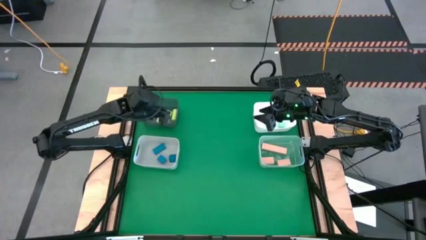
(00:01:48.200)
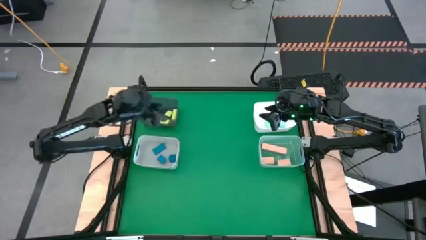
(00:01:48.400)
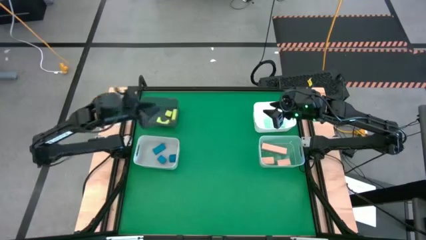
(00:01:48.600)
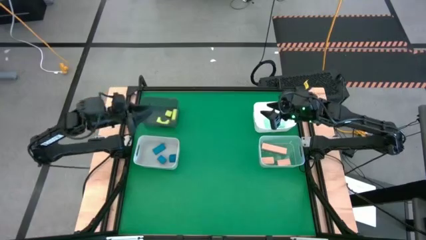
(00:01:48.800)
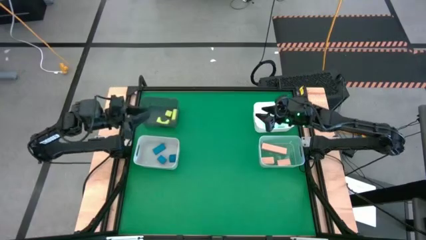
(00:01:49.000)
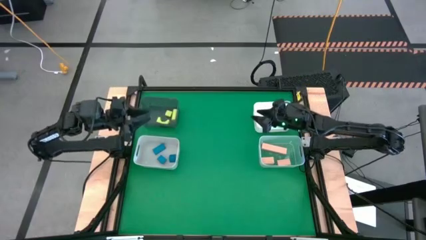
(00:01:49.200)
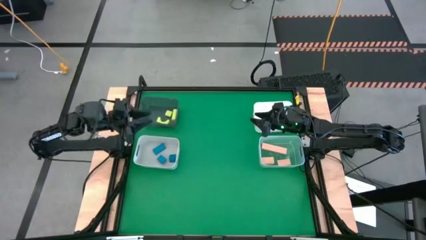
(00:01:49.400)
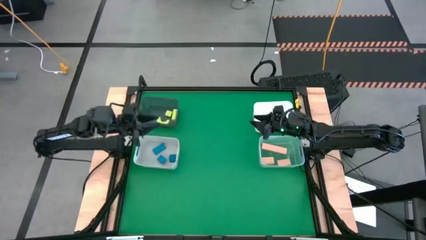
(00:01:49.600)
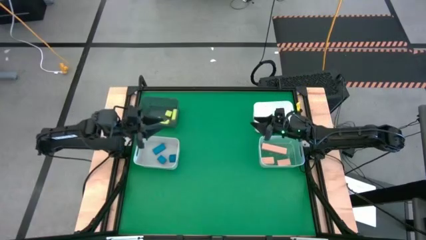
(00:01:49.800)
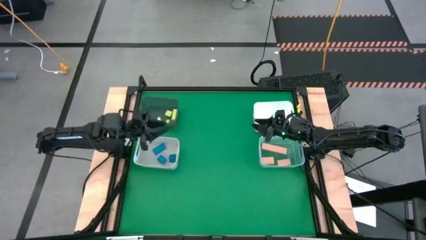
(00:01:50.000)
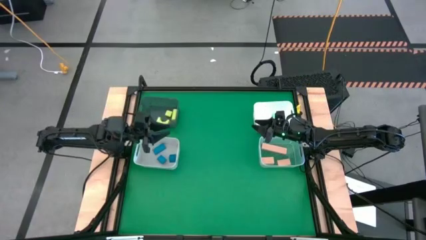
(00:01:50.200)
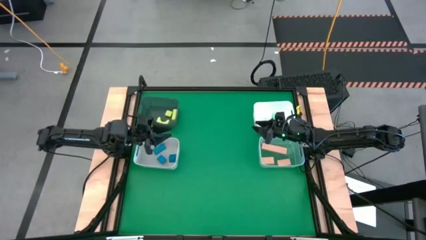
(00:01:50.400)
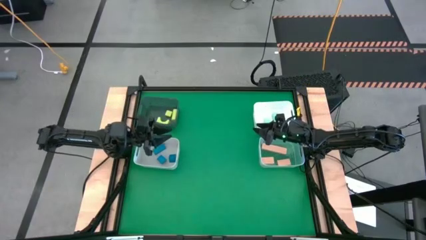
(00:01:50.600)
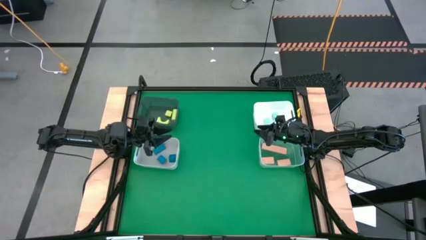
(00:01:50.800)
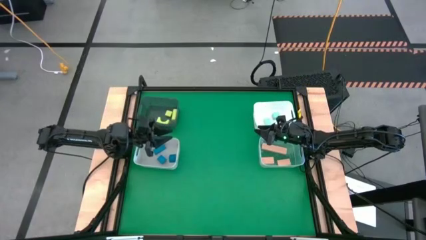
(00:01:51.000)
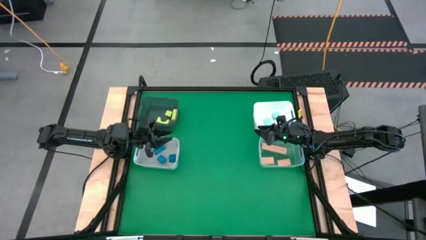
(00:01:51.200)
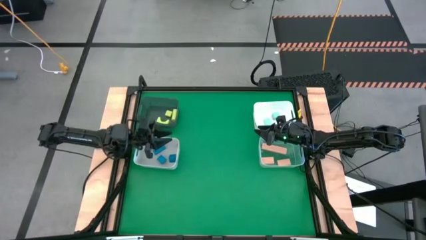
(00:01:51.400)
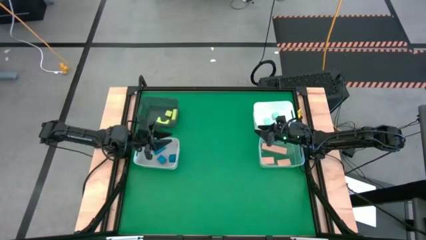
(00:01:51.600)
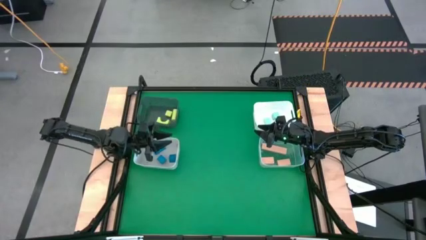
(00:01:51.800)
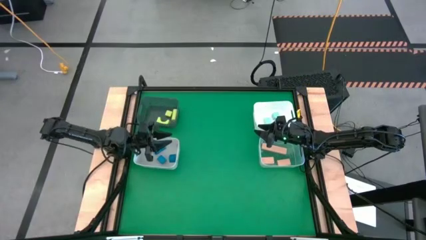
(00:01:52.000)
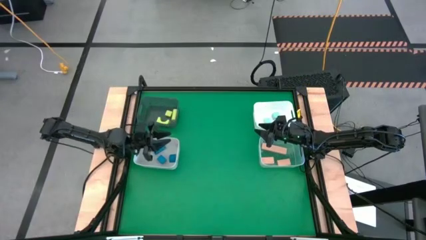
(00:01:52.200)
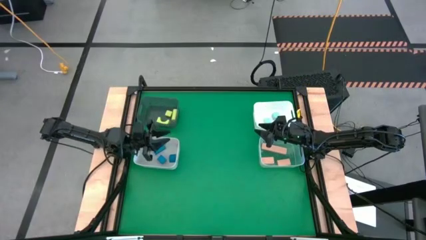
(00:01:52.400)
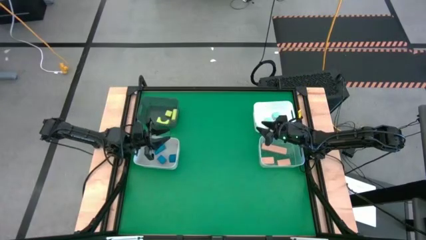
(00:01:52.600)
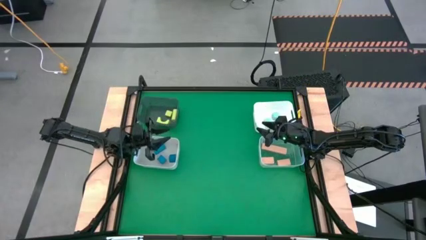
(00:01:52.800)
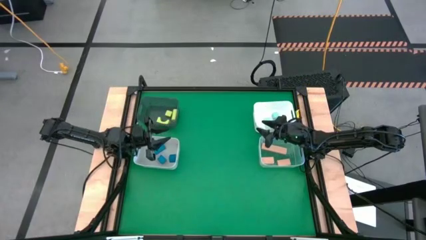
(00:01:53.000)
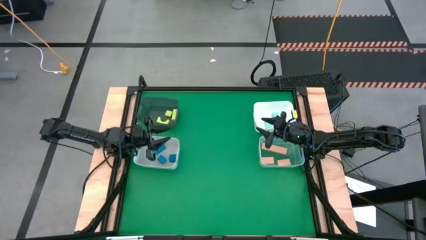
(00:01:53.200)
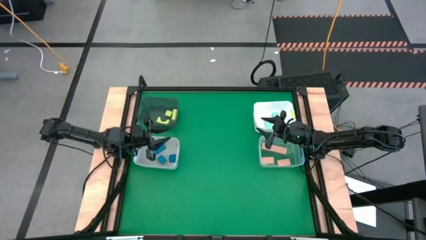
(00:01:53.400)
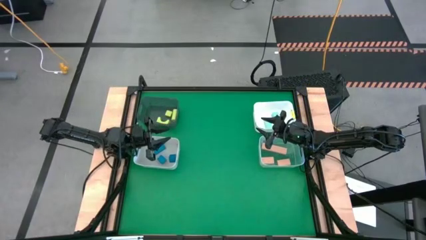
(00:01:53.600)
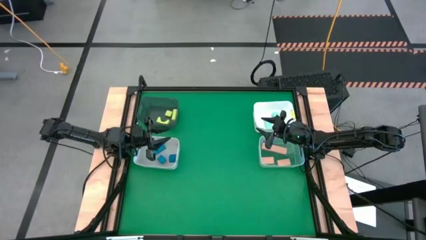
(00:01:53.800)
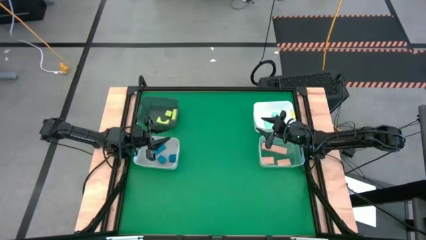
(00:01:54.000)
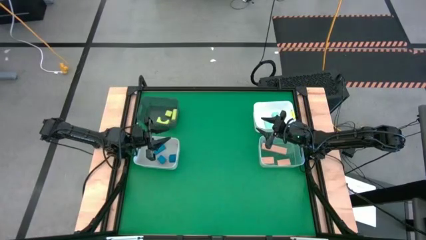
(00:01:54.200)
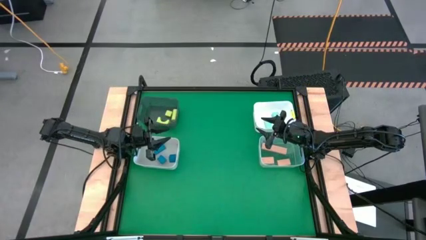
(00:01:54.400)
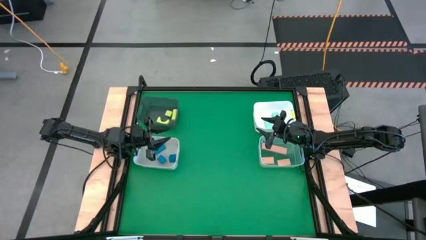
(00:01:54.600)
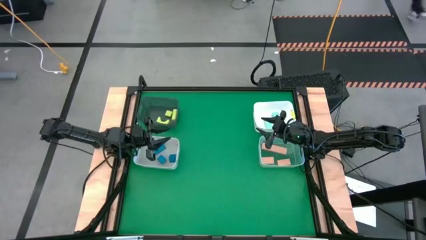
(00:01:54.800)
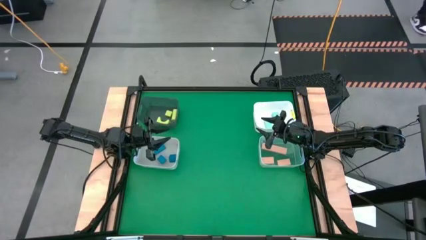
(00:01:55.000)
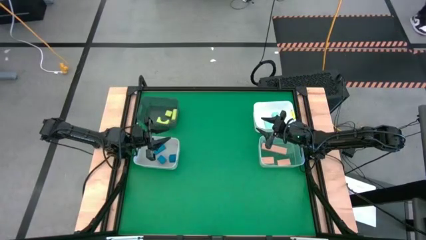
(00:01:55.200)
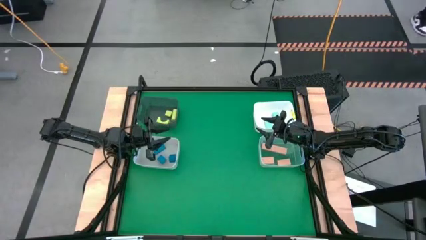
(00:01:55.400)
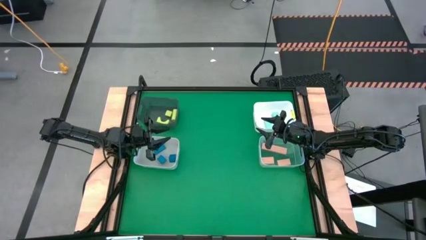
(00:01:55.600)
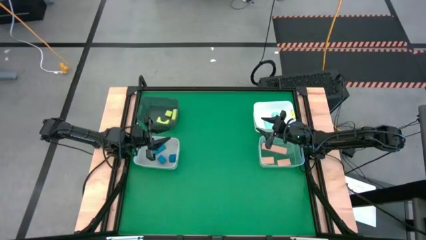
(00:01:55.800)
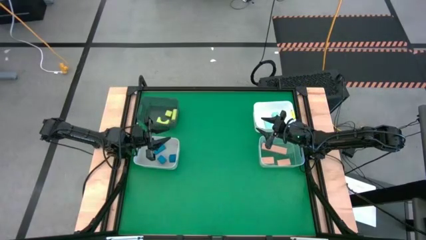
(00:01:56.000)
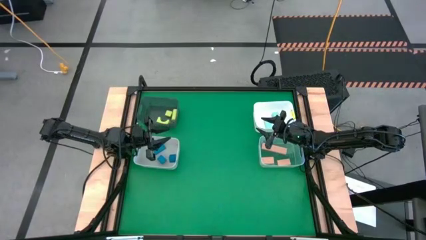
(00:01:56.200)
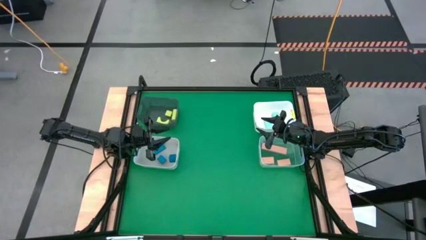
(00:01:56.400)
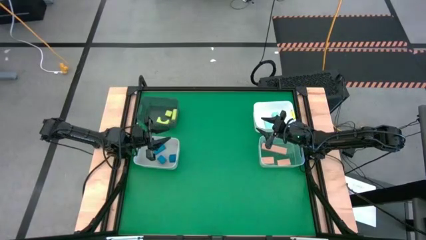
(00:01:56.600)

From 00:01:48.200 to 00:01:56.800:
Task: Sort & place blocks by color
Return to Home Position

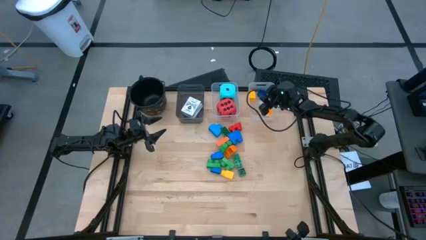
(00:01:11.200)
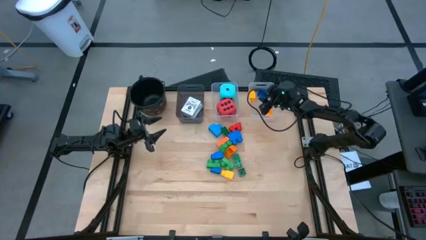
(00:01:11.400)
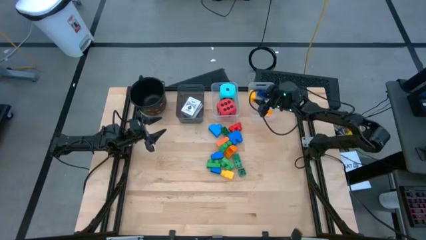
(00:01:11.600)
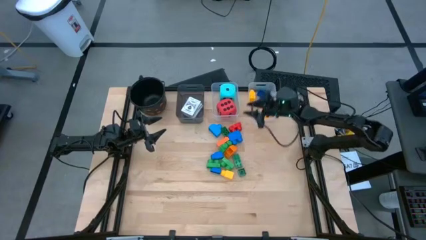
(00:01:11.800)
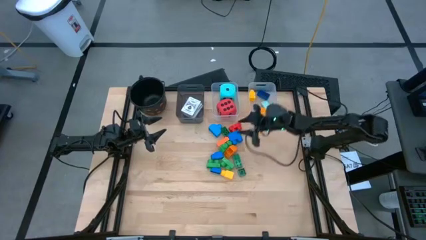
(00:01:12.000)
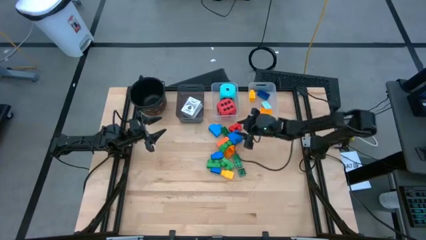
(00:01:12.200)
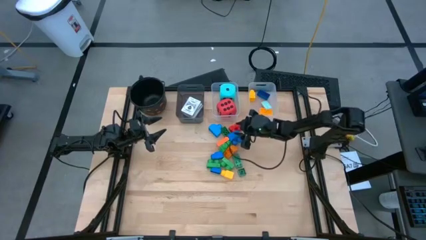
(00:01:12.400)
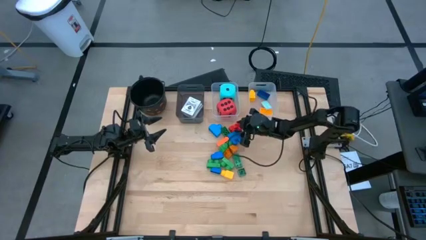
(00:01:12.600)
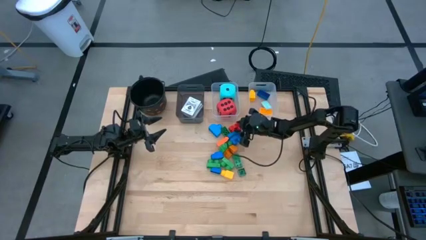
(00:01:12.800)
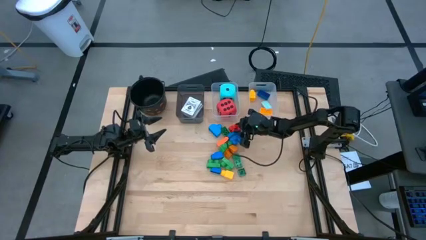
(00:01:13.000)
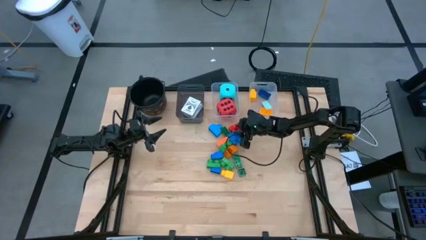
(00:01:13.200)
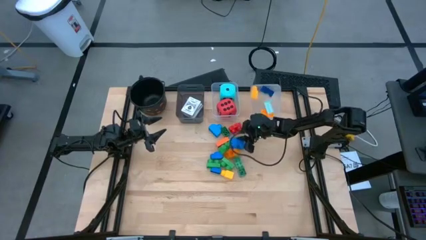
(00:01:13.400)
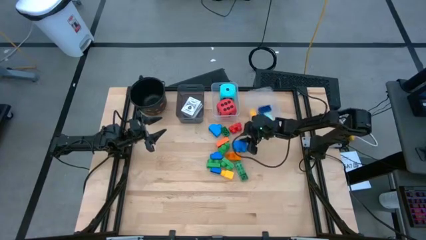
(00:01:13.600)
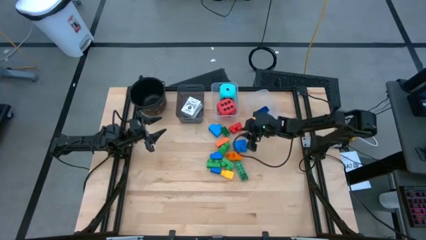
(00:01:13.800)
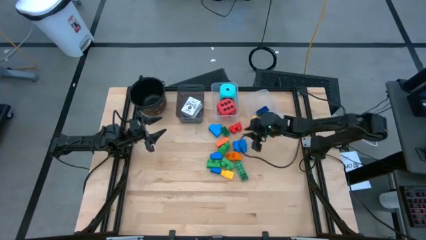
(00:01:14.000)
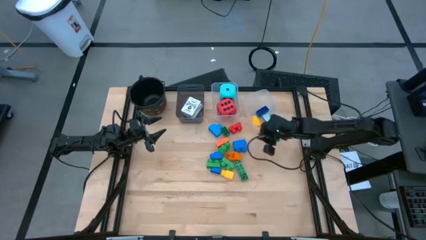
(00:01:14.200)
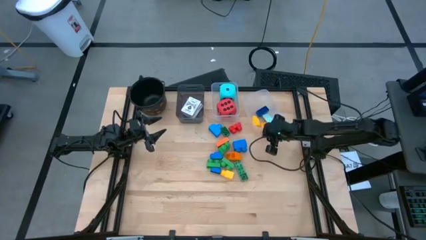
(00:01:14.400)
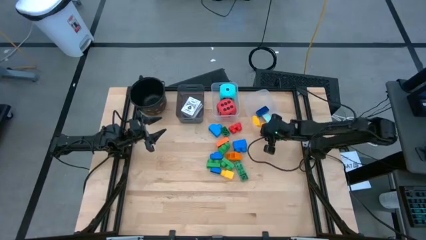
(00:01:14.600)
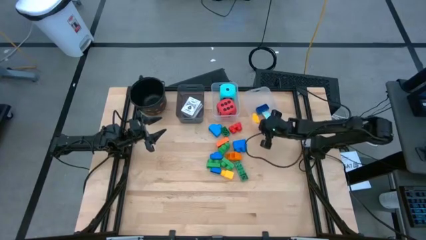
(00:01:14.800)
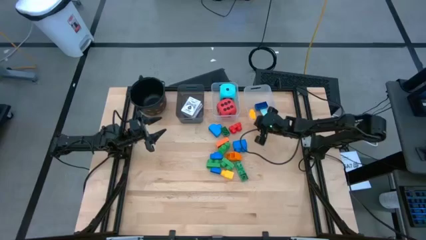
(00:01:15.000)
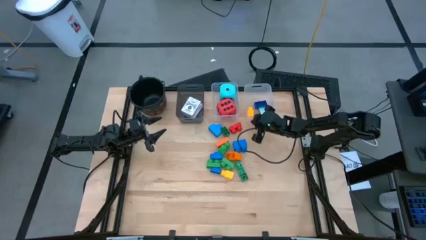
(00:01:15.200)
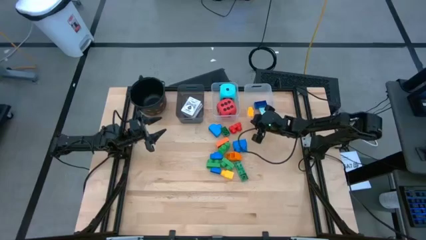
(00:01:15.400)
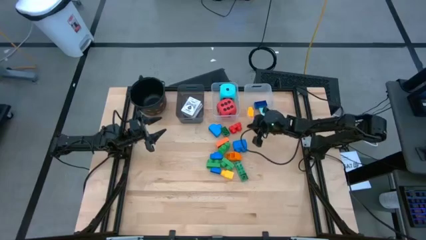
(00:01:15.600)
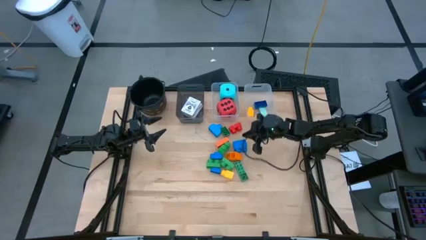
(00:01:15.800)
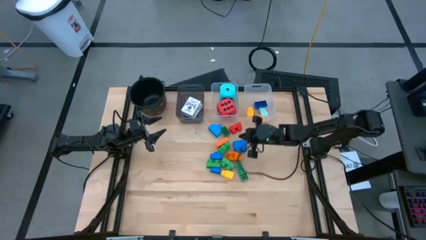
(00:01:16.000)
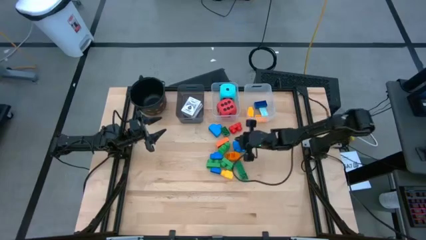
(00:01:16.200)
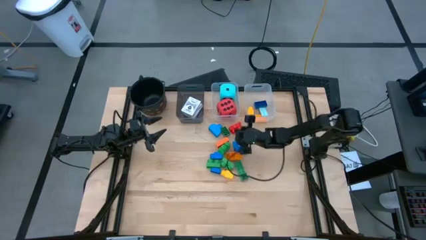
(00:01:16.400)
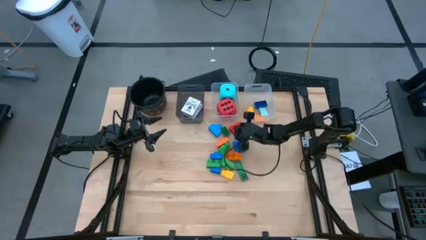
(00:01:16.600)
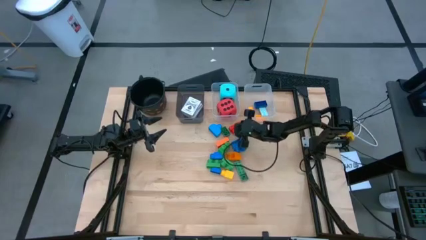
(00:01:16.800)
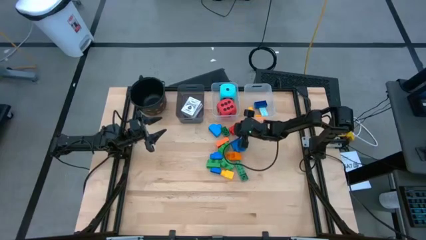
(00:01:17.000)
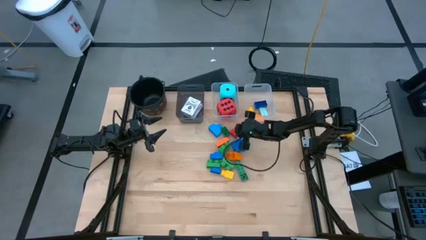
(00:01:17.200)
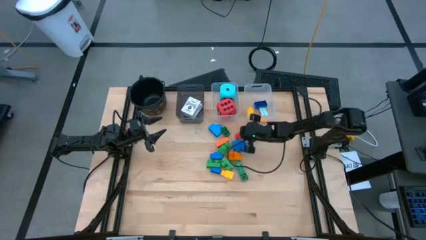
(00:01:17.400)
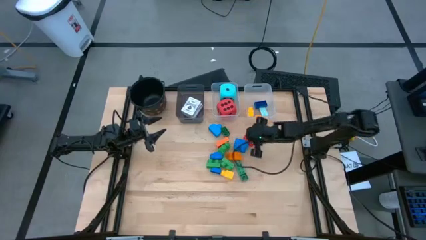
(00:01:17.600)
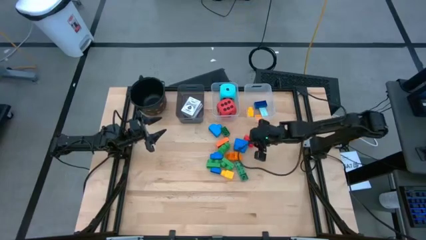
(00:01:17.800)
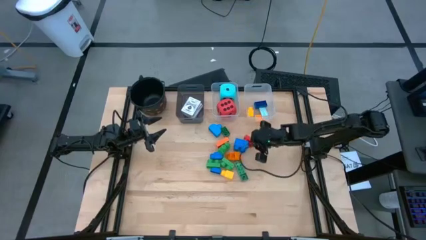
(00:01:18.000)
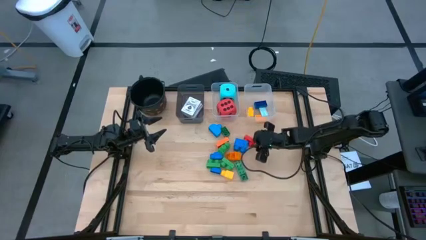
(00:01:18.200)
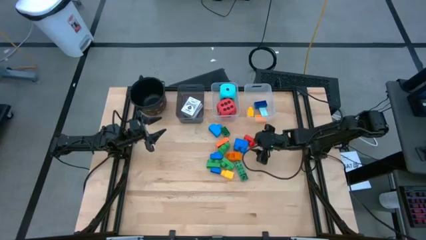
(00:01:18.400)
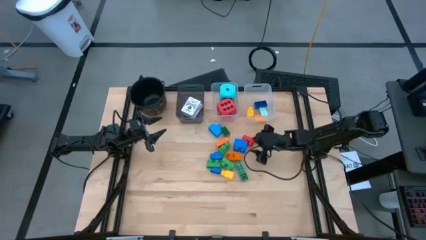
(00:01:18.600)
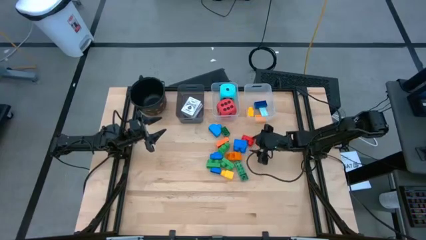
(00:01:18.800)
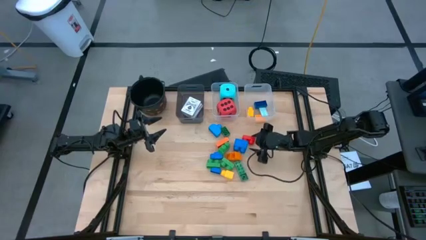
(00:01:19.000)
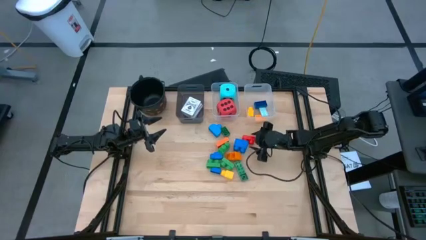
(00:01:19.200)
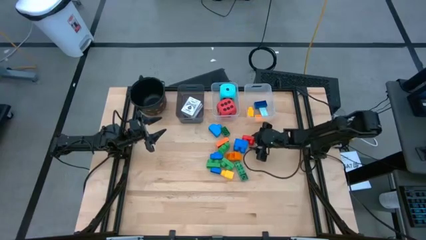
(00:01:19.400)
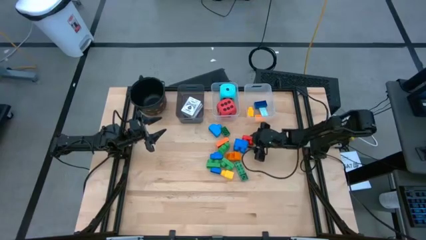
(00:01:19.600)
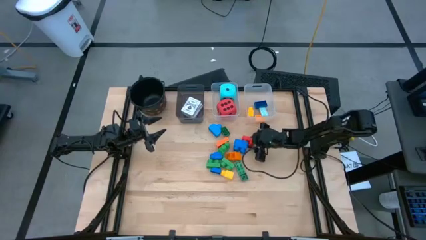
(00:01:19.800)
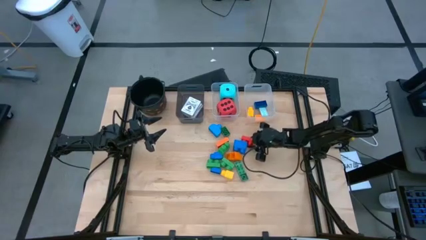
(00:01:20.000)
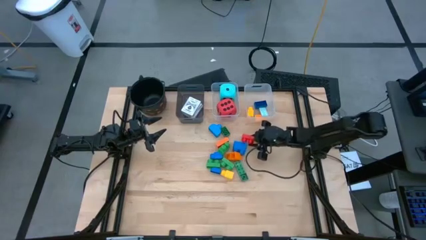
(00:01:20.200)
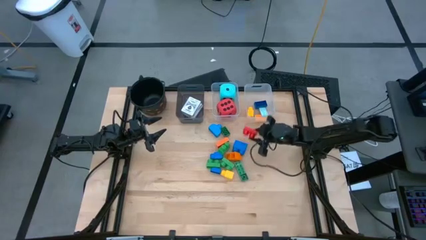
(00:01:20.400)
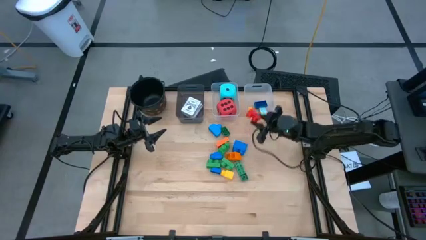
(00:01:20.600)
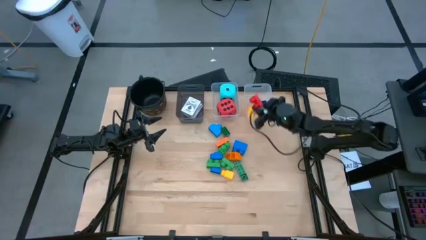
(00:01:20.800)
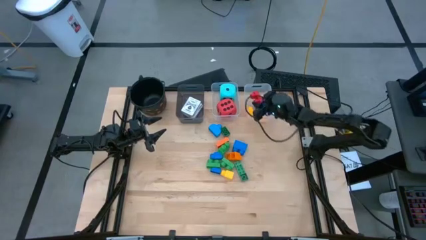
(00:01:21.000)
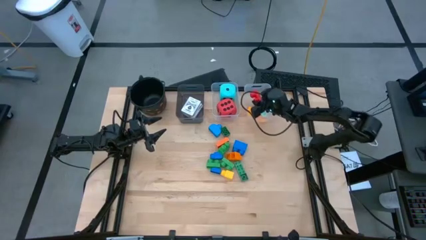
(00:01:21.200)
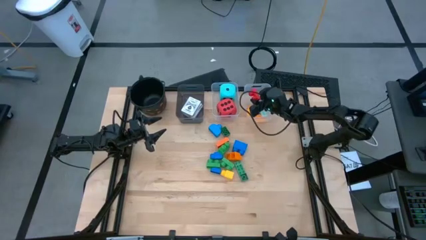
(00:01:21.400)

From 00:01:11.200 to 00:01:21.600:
Task: Pick & Place Toys
Put the red two stud game piece into the right transparent bin
